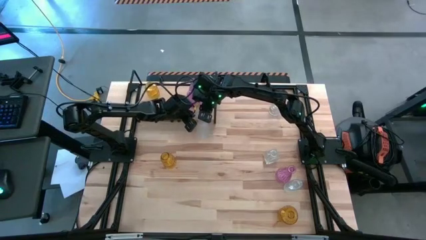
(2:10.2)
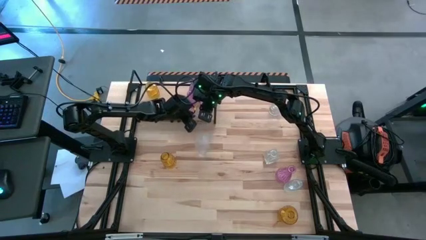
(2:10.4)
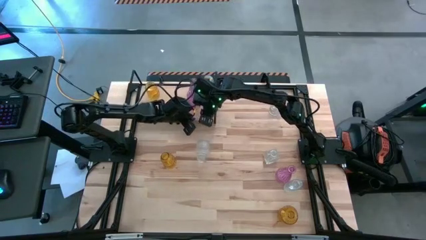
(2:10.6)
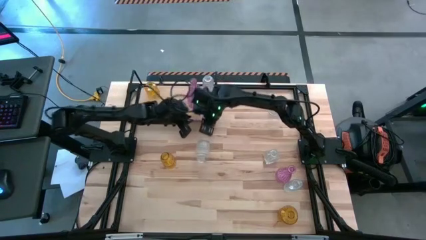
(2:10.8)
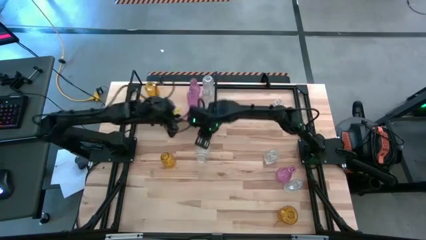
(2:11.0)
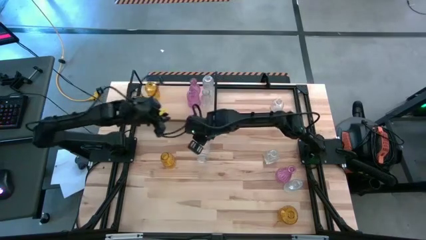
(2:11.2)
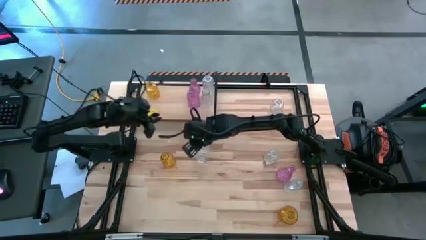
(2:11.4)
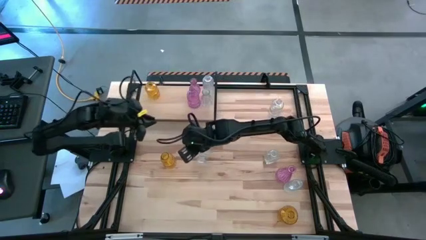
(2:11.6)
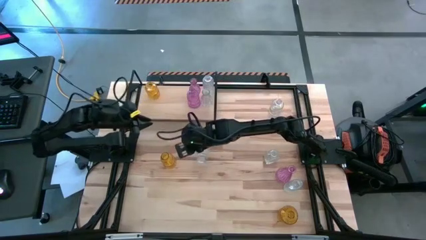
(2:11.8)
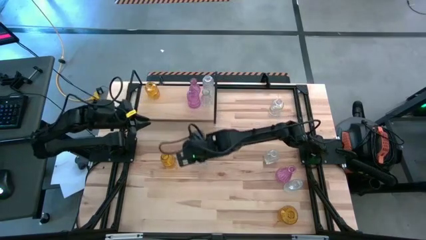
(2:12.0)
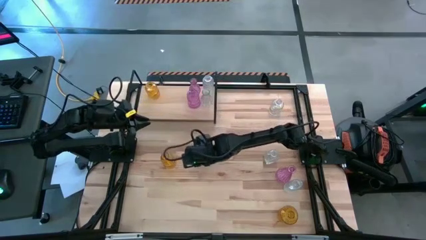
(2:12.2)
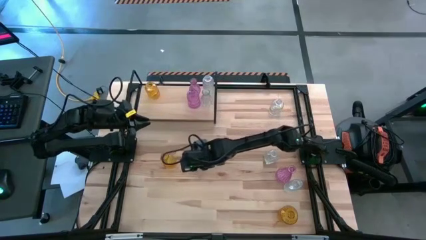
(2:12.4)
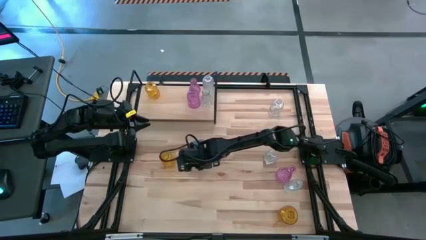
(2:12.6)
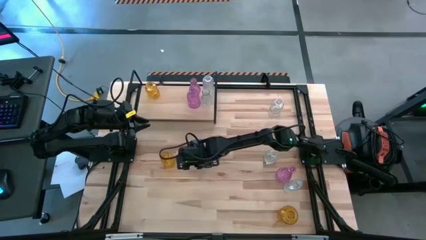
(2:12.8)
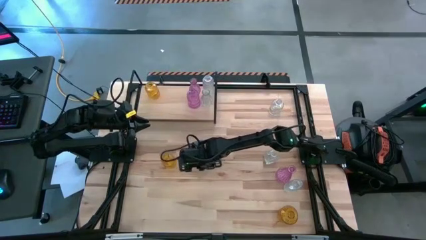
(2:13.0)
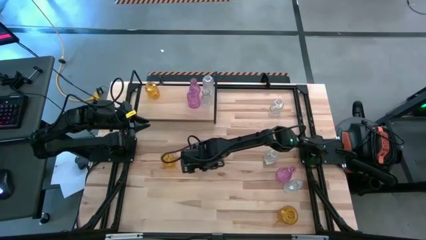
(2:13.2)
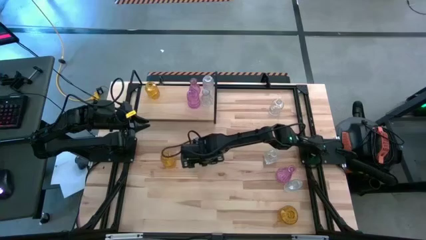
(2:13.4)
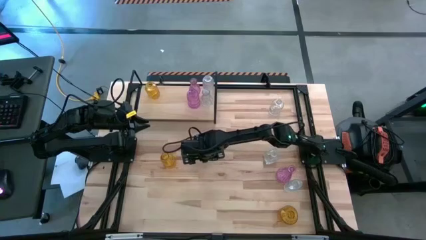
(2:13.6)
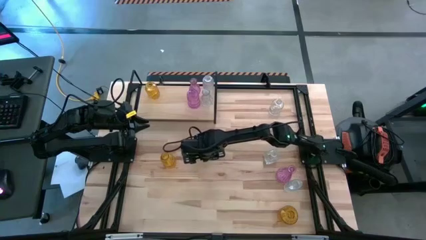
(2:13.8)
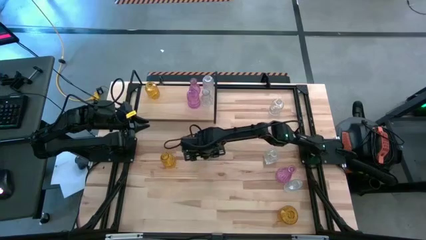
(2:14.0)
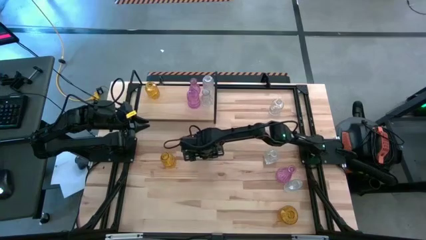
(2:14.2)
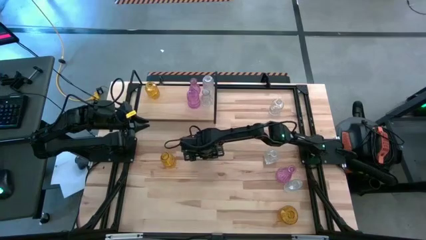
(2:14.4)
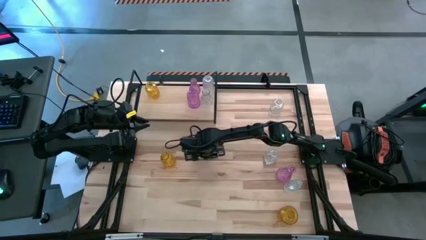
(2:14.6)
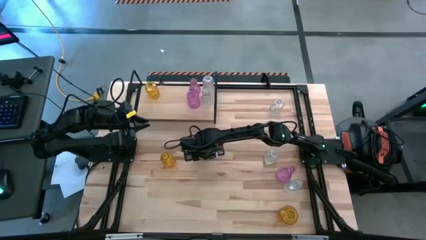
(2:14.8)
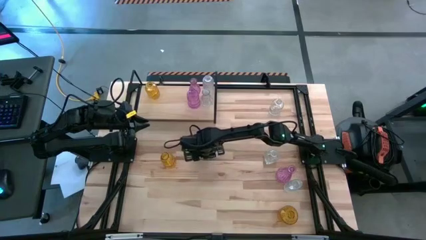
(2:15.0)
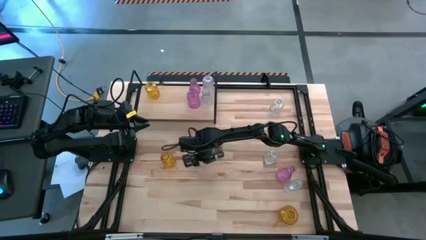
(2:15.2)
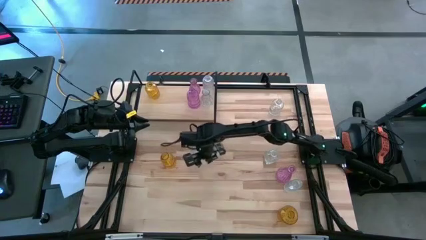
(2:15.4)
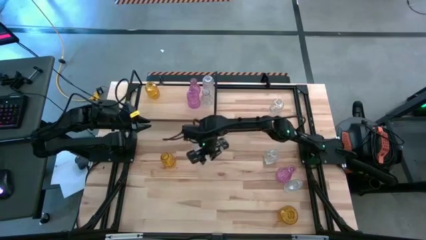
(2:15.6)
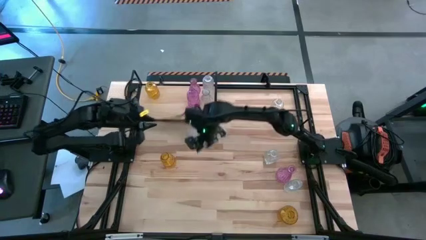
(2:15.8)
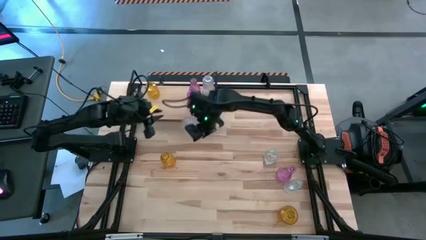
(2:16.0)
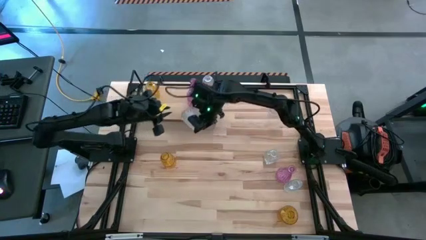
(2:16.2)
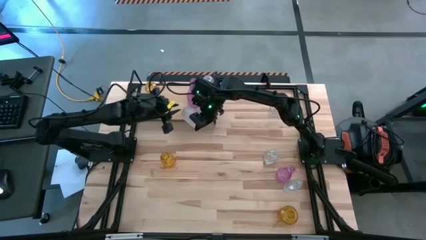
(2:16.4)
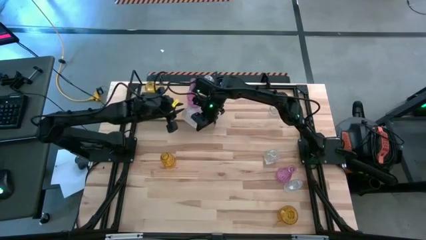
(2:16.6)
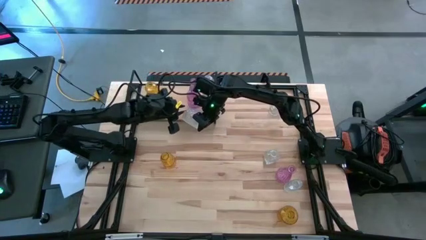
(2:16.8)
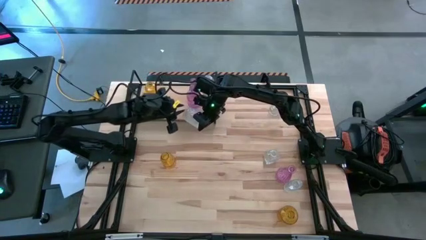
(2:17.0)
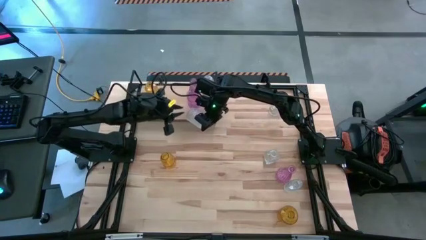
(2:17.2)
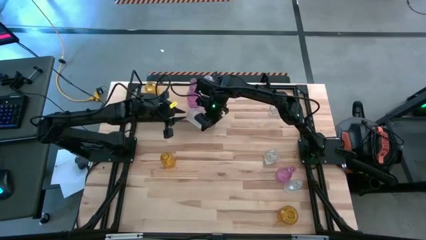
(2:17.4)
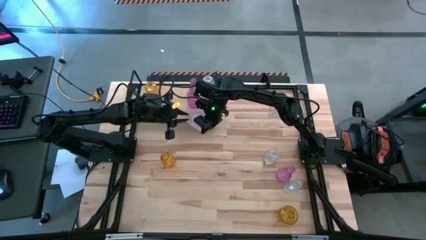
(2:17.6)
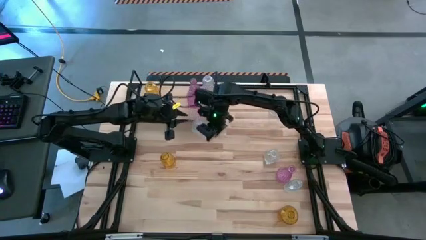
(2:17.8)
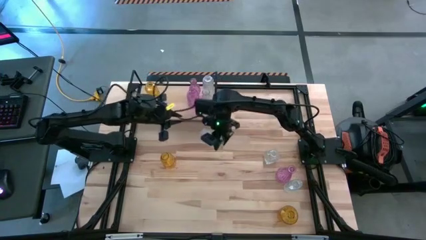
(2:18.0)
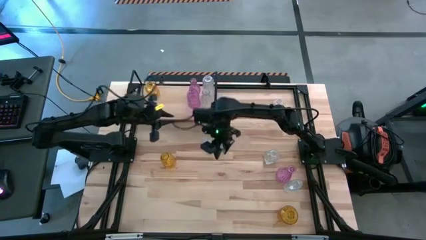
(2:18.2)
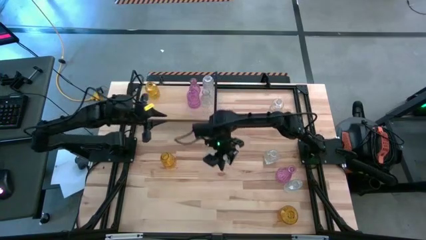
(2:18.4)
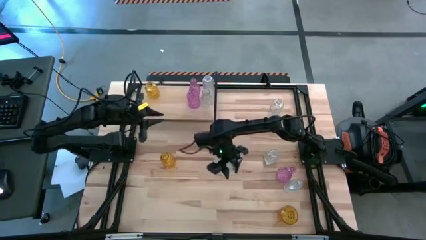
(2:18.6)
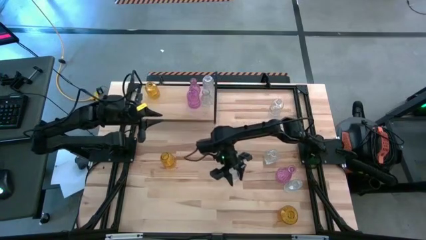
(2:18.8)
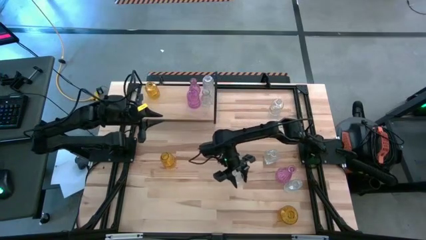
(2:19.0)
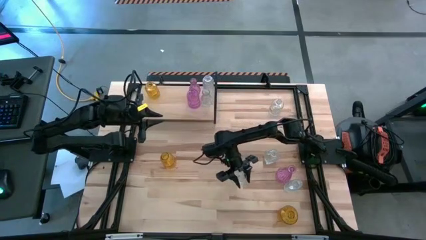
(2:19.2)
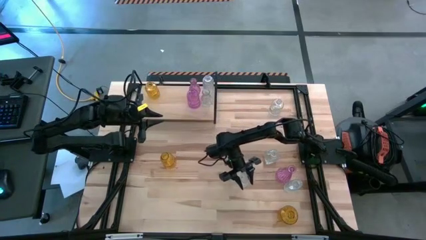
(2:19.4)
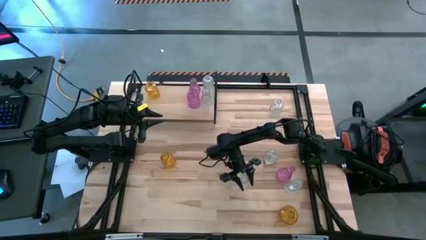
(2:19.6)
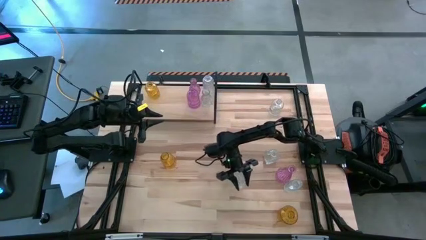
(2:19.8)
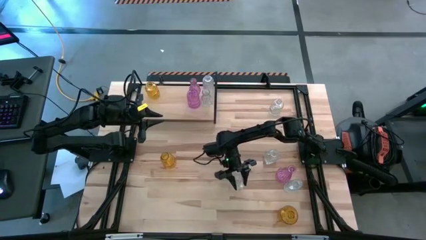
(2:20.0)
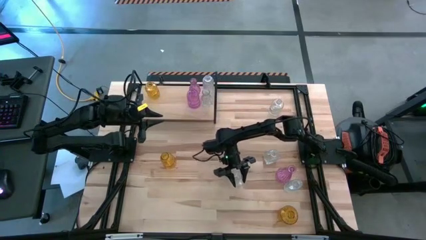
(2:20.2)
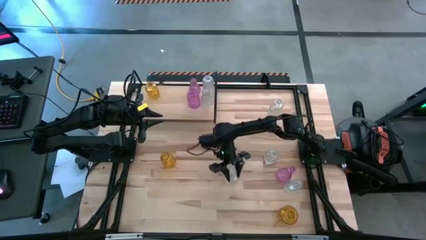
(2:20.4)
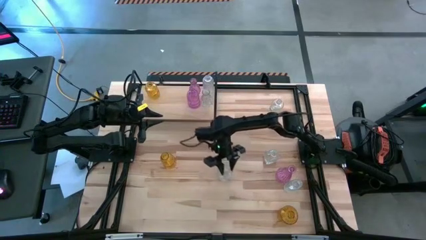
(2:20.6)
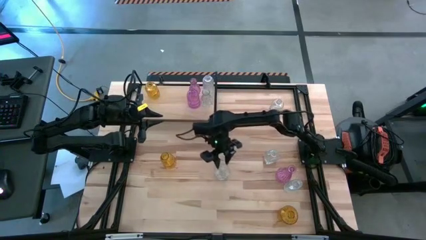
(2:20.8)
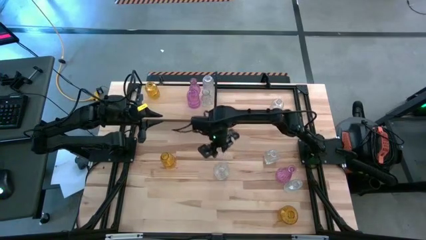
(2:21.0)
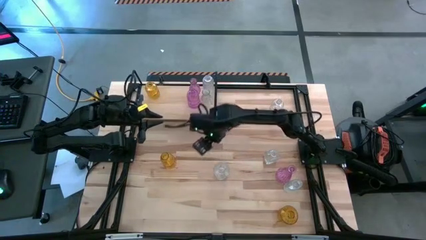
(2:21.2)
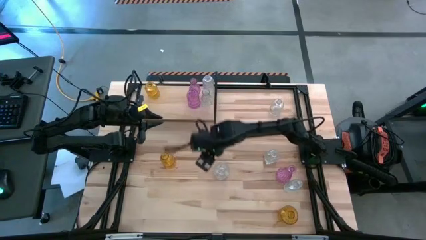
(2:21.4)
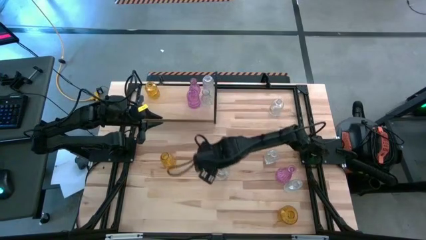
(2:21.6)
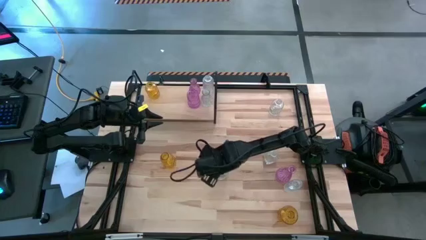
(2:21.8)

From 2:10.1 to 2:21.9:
Task: sort vases onto shelf
Put the transparent vase on the shelf aligned with the other transparent vases

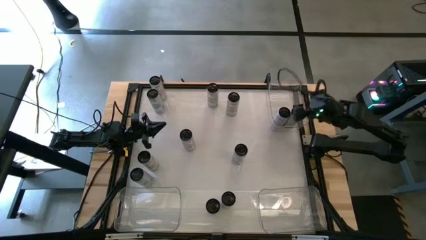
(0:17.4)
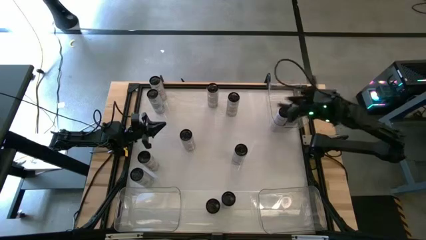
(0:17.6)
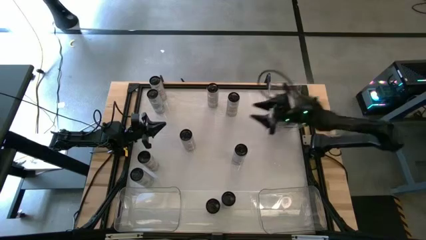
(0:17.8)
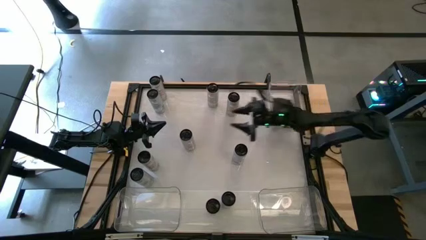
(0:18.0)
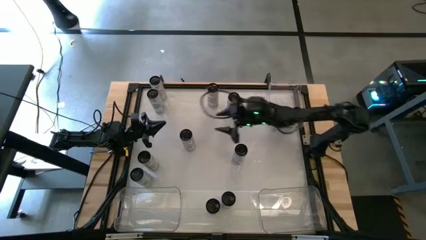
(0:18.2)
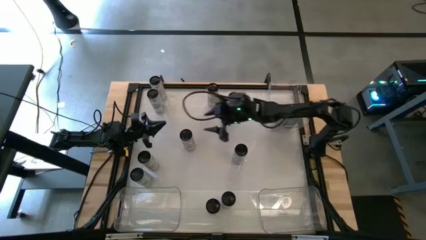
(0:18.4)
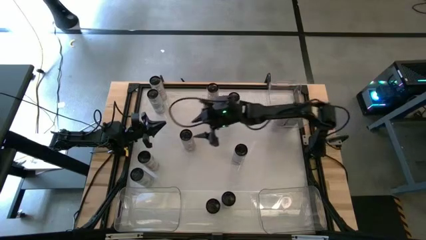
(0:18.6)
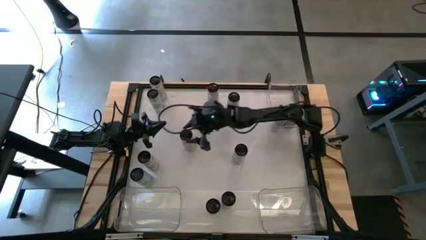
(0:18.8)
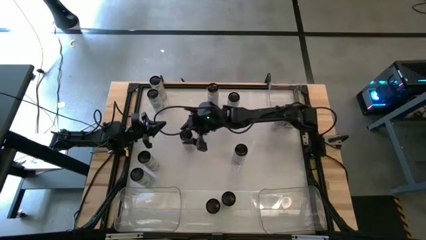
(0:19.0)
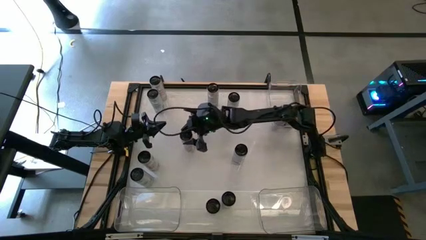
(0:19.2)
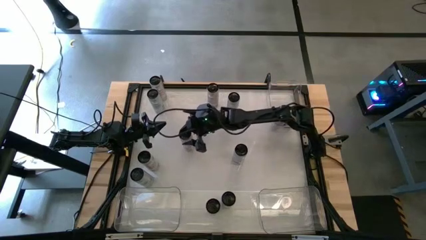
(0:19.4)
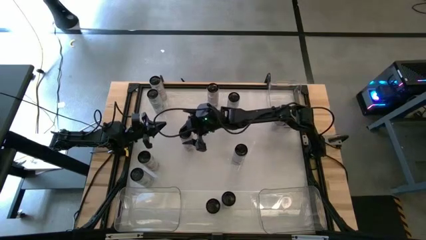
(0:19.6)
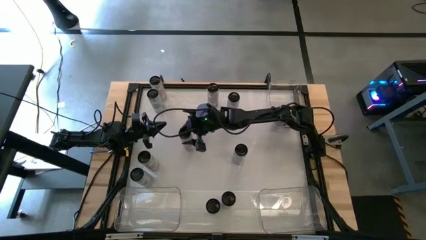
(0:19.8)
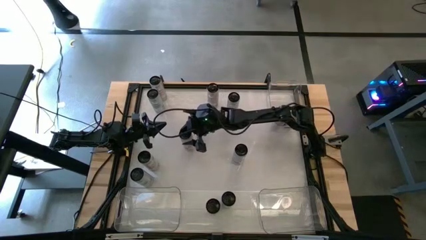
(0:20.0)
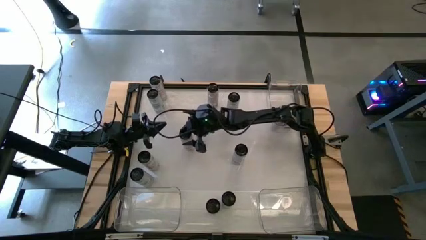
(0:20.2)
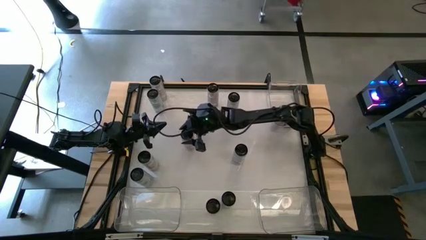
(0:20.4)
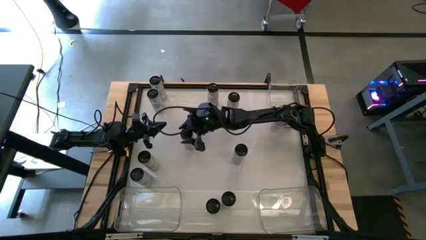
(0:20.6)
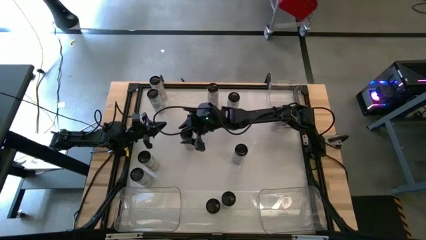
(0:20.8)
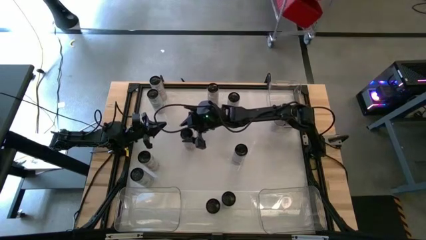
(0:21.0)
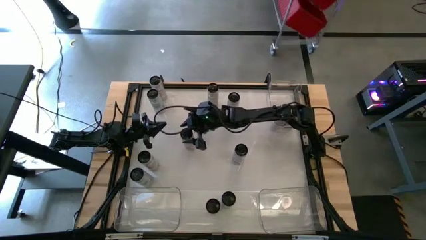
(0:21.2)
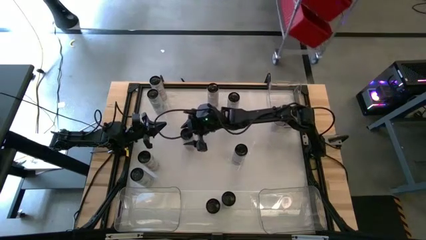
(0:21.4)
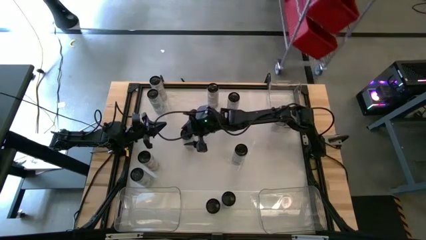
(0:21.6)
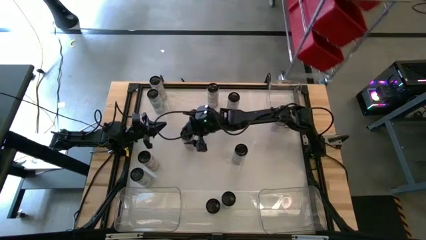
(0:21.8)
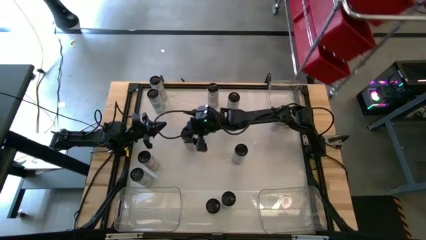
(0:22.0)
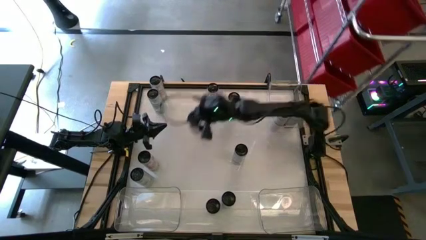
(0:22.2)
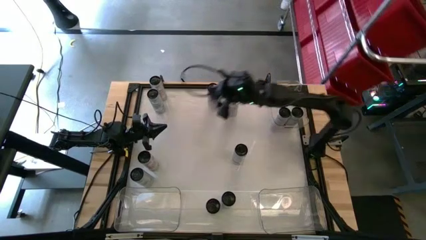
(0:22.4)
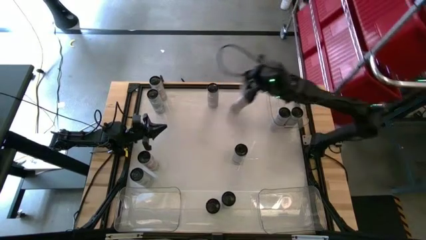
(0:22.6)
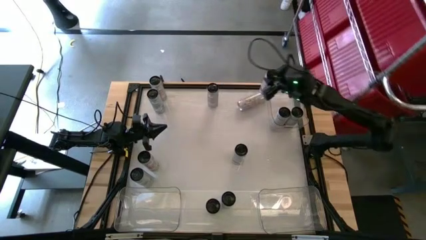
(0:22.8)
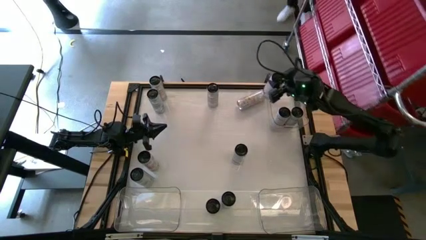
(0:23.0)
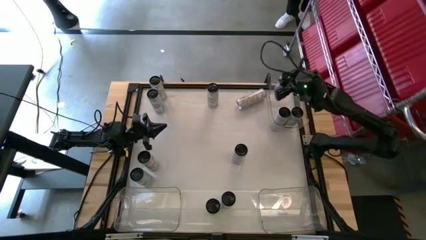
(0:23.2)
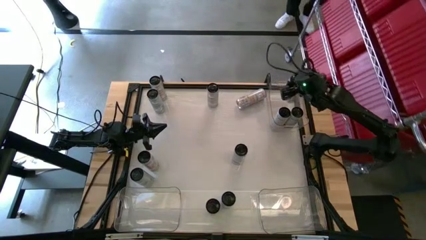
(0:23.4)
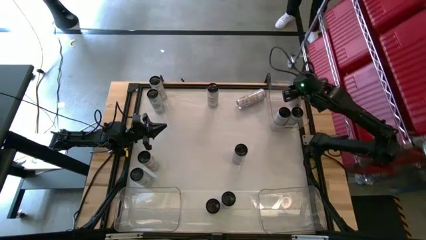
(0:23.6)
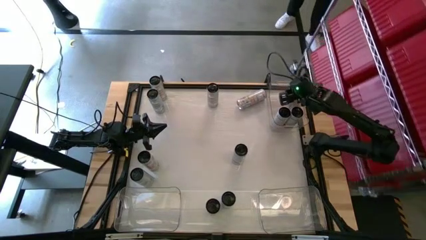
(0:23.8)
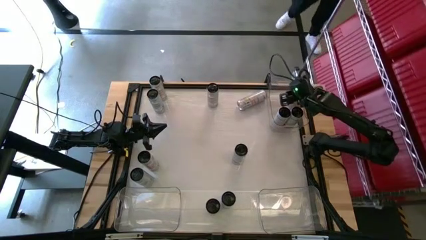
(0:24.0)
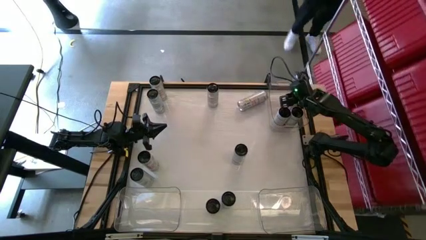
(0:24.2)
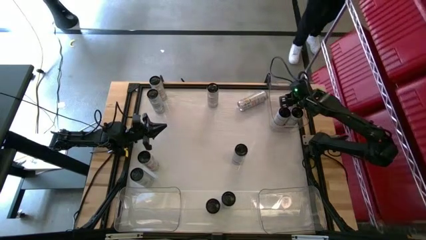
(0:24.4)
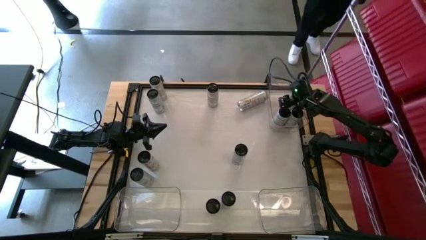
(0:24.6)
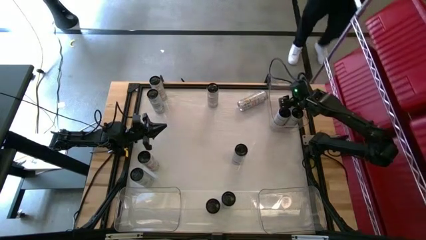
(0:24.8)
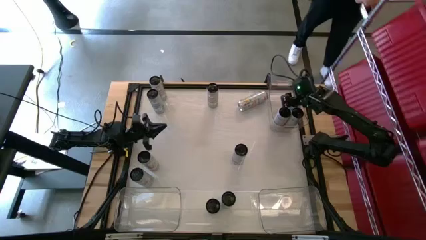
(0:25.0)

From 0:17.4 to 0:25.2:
Task: Sort soda cans
Put the right white-pink soda can into the top transparent bin
